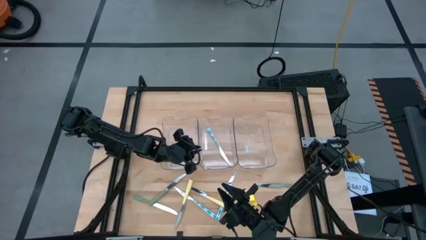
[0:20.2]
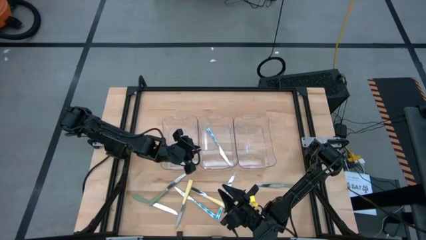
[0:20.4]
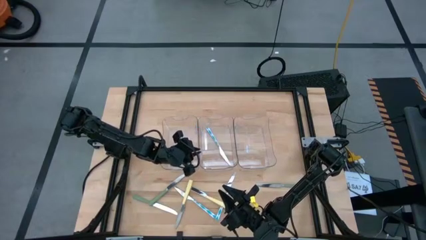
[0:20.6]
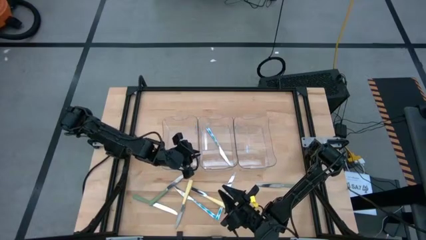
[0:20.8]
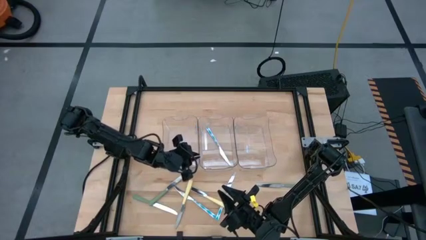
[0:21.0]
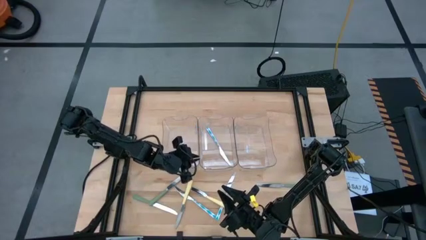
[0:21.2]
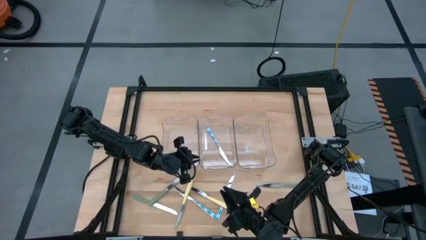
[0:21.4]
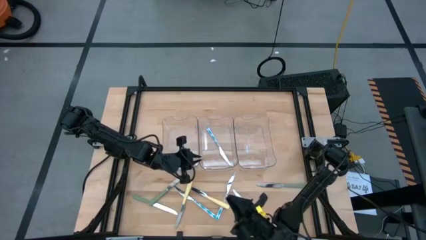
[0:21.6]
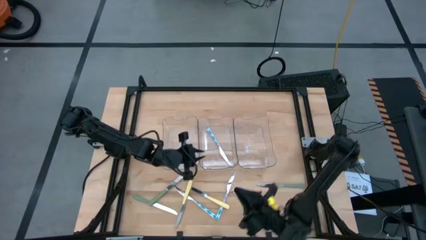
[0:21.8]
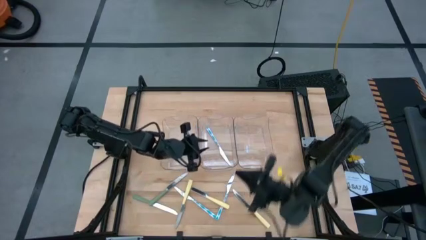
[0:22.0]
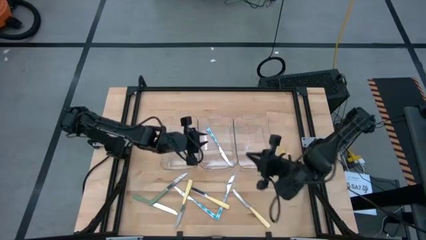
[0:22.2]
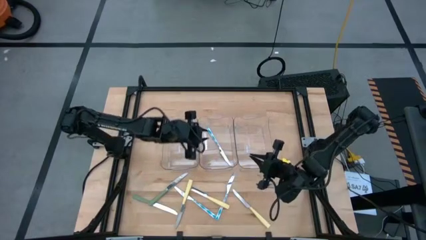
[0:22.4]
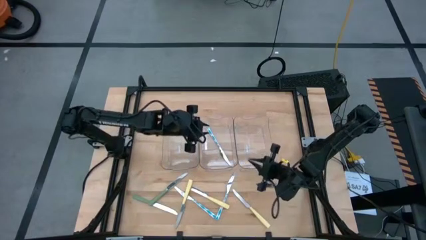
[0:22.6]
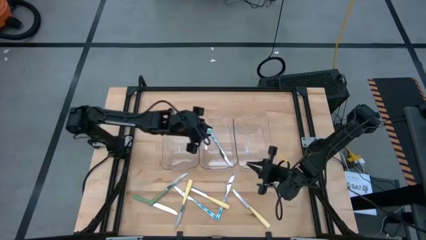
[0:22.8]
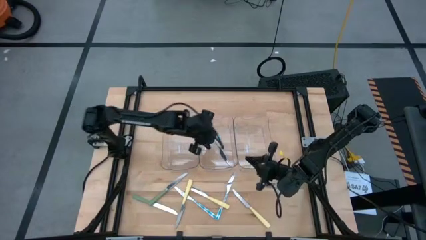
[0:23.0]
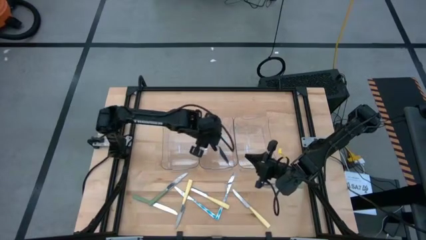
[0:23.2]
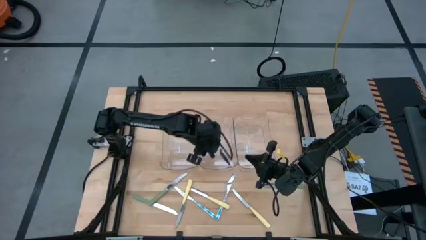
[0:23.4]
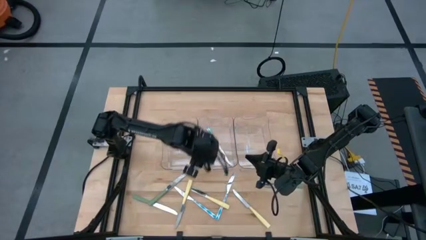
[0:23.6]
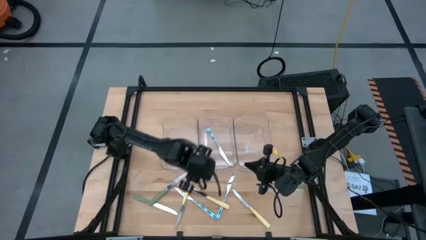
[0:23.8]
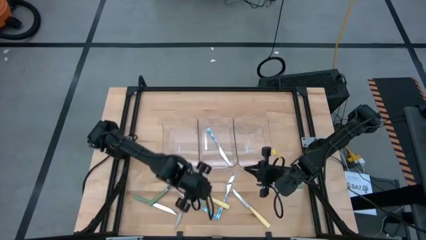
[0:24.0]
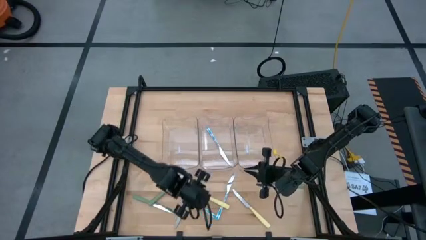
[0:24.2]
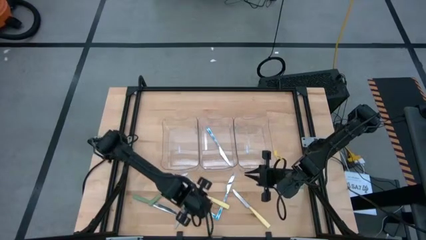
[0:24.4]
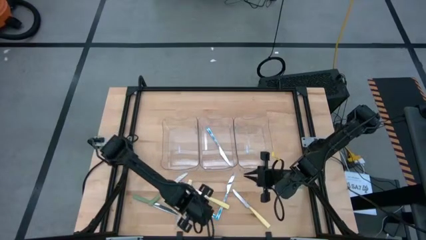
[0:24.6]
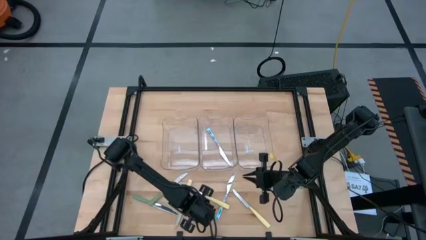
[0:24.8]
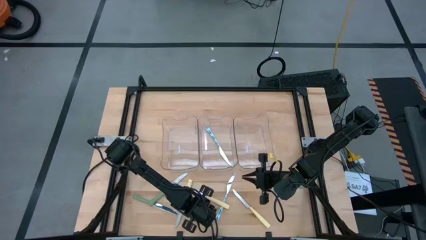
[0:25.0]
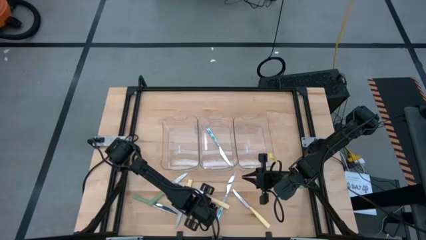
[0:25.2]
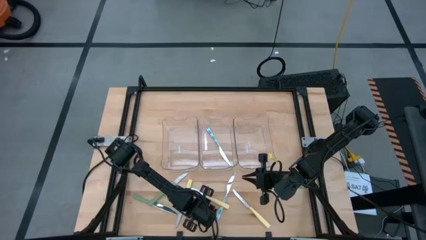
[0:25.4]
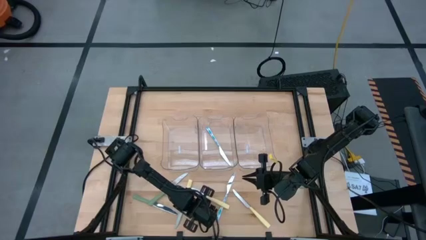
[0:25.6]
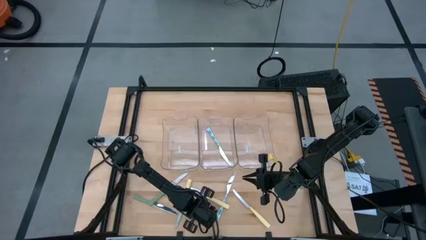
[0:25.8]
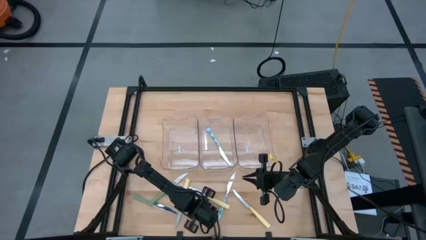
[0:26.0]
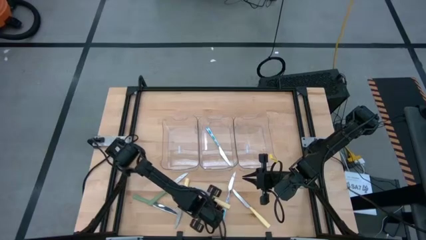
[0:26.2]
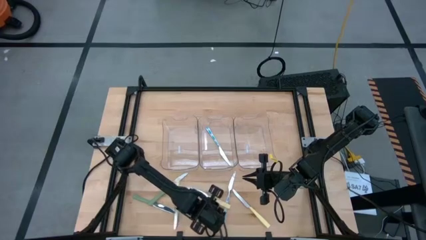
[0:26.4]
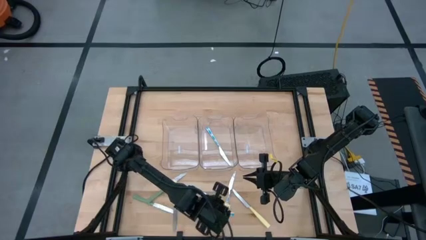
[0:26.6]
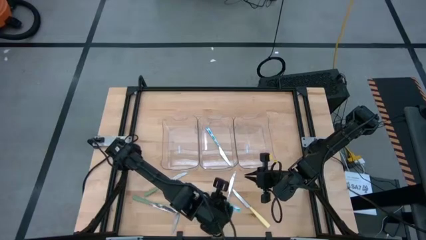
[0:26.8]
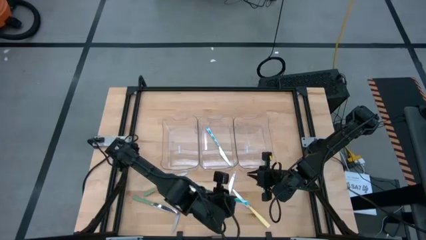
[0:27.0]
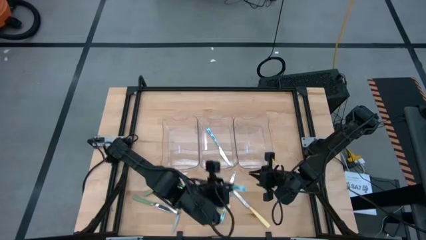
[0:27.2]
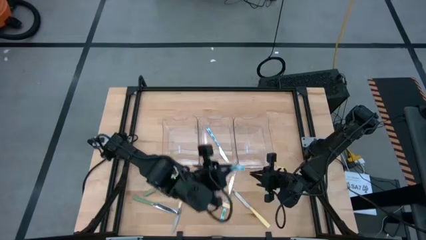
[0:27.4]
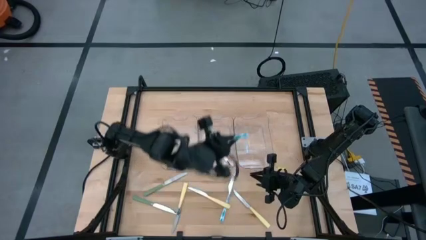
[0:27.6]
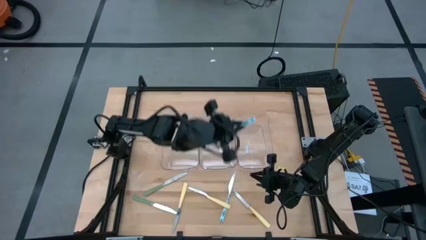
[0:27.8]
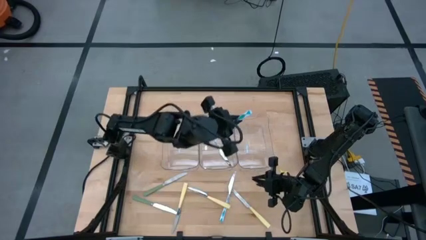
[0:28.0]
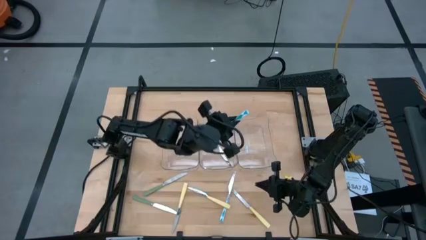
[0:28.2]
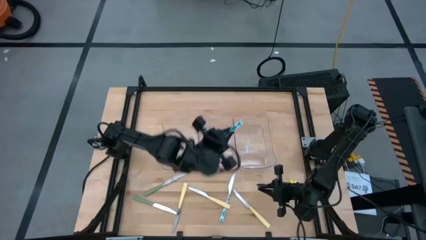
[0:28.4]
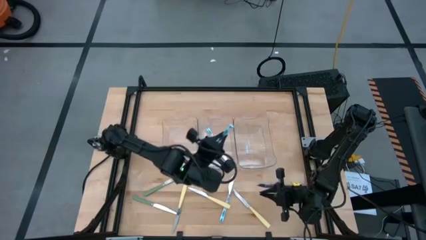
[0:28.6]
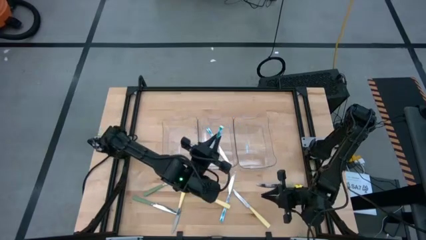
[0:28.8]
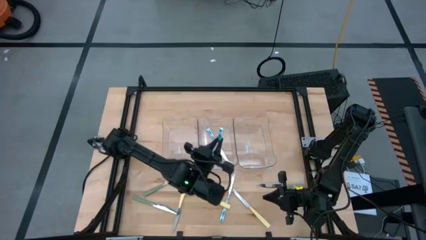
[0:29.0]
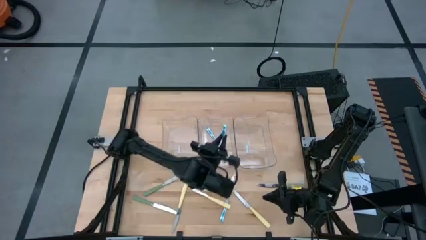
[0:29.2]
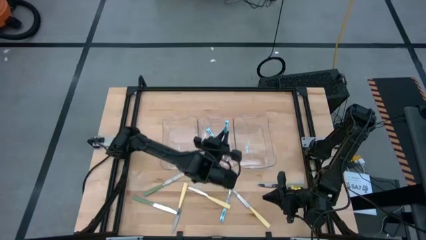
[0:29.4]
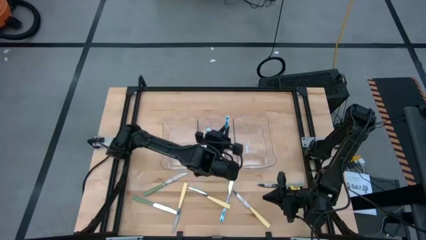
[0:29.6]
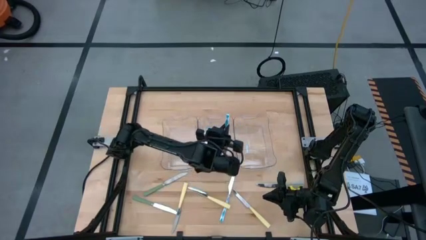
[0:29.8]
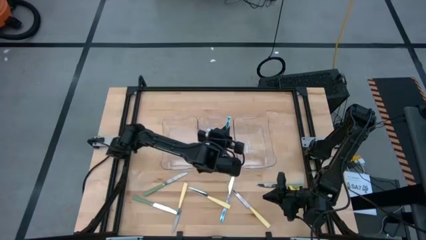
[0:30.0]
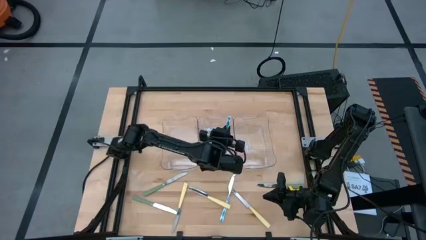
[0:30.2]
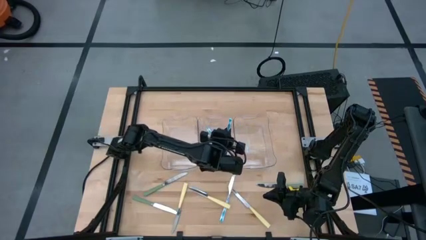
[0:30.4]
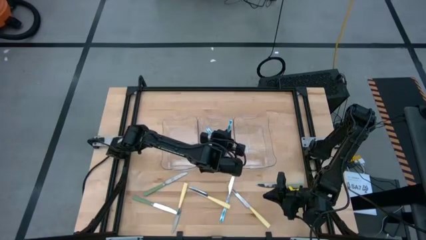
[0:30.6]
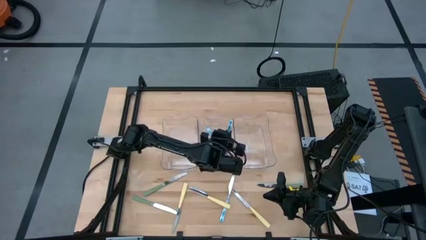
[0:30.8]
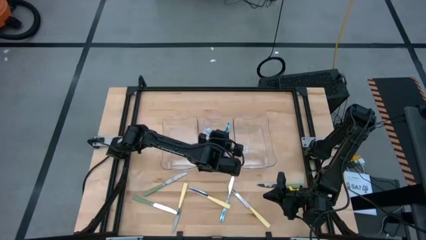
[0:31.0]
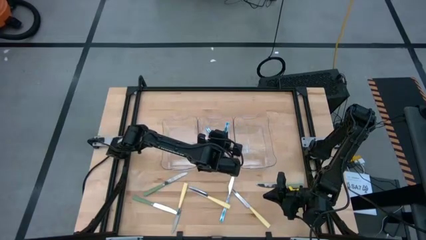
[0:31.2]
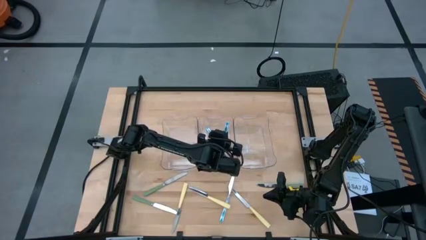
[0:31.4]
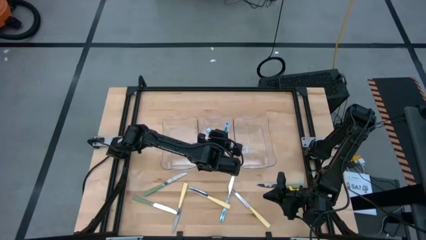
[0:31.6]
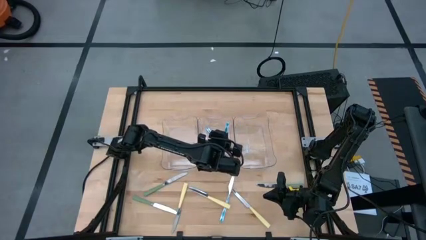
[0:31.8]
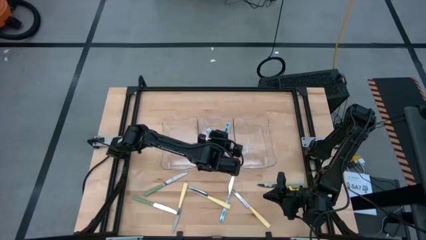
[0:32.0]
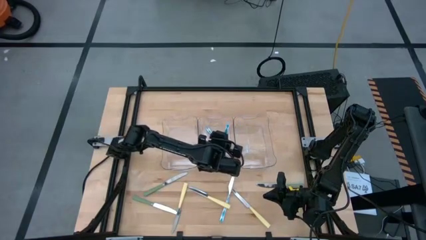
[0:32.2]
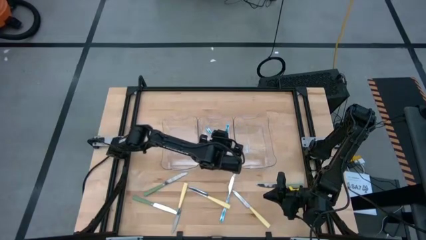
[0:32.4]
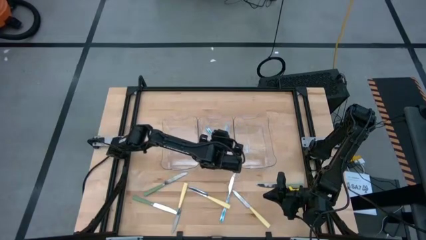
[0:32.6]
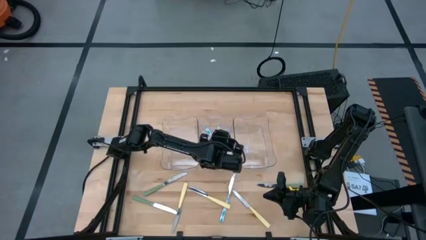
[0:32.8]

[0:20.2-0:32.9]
Task: Sort silverware by color (type)
Put the left blue knife into the middle transparent bin
